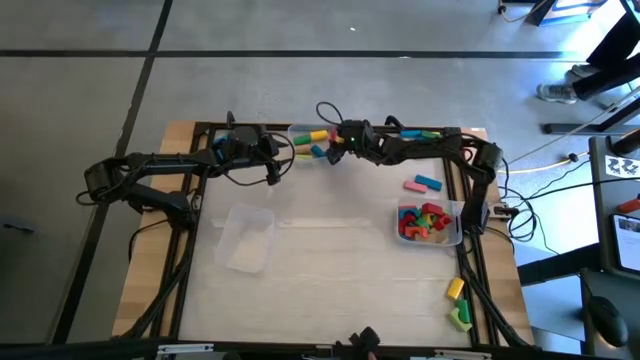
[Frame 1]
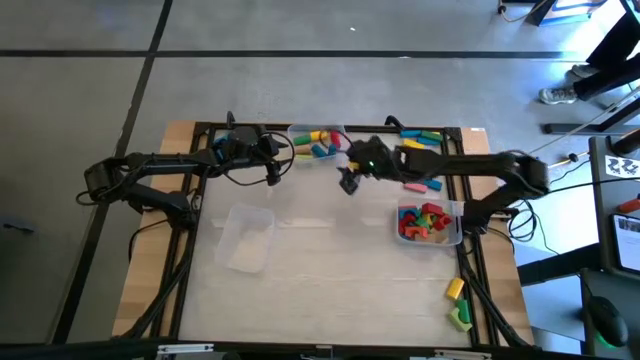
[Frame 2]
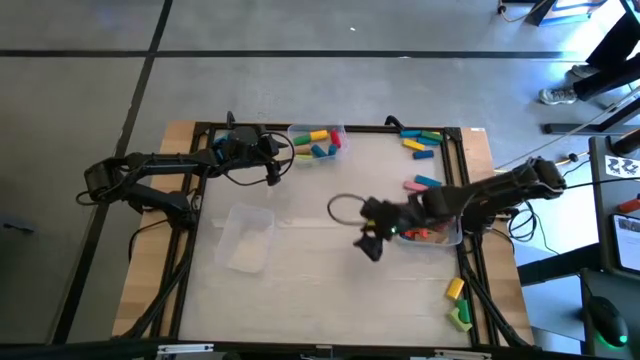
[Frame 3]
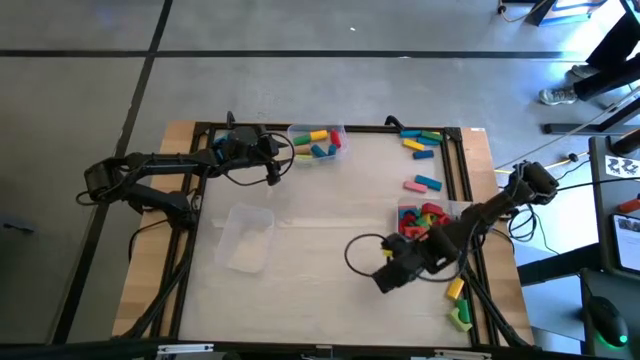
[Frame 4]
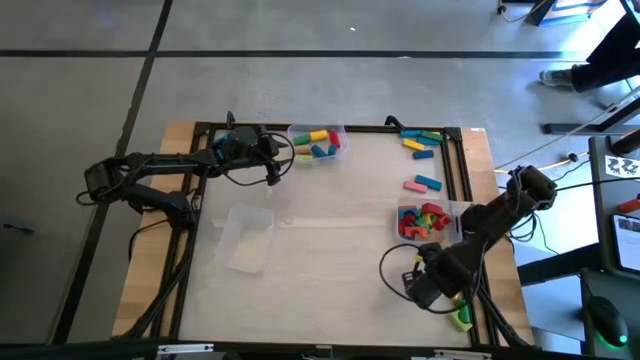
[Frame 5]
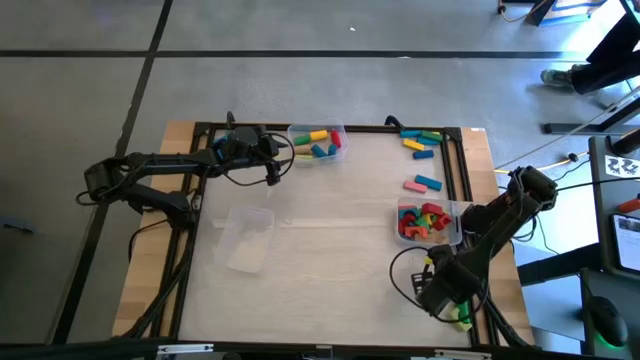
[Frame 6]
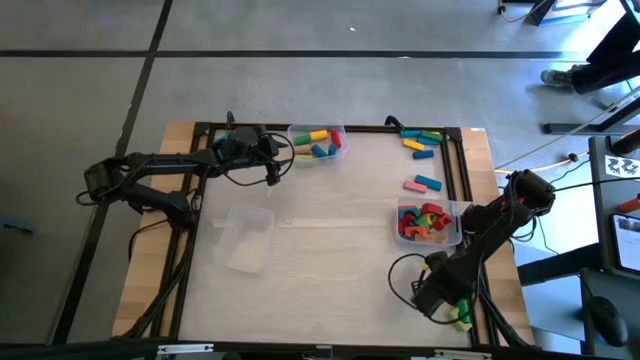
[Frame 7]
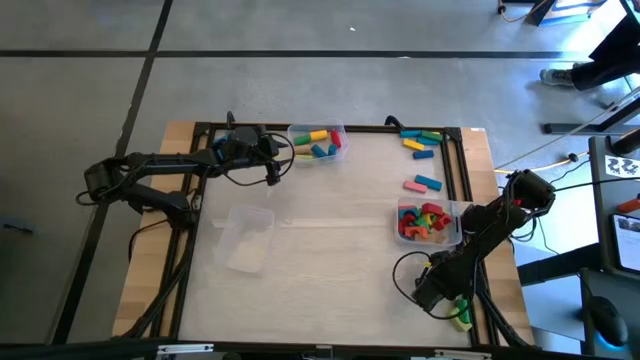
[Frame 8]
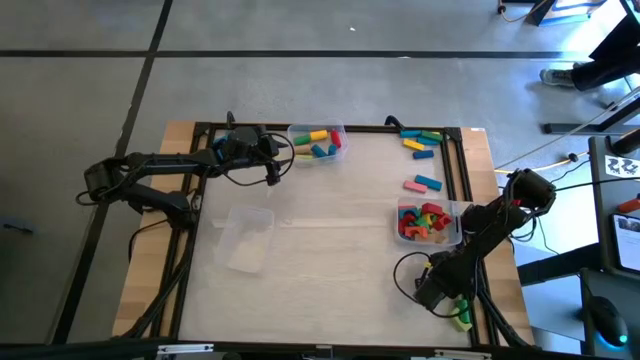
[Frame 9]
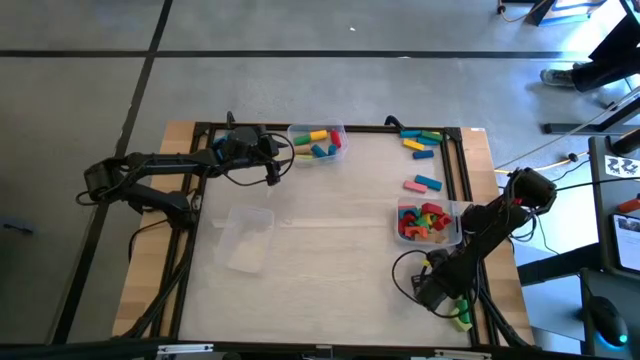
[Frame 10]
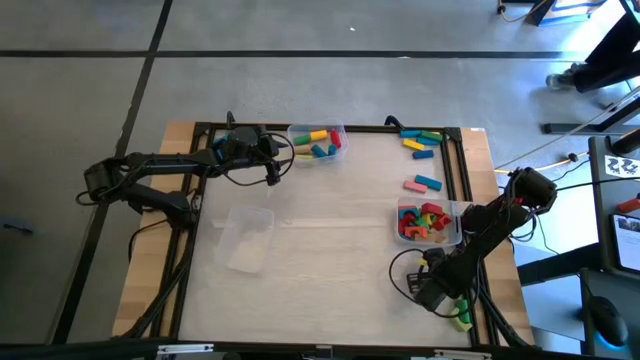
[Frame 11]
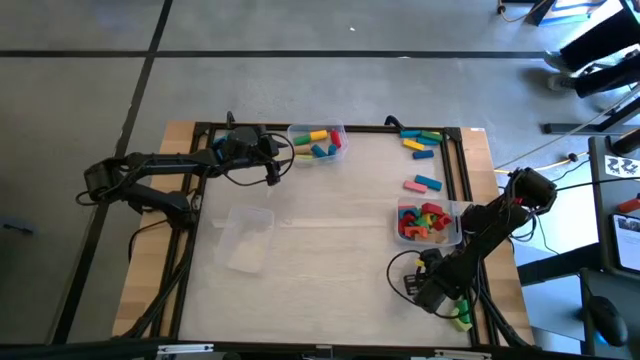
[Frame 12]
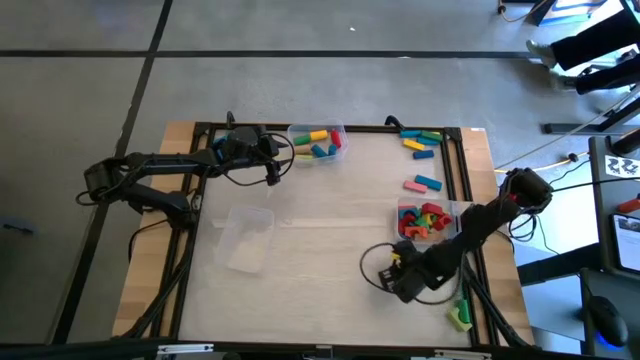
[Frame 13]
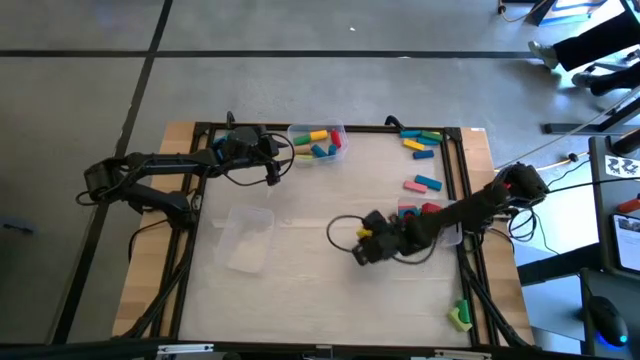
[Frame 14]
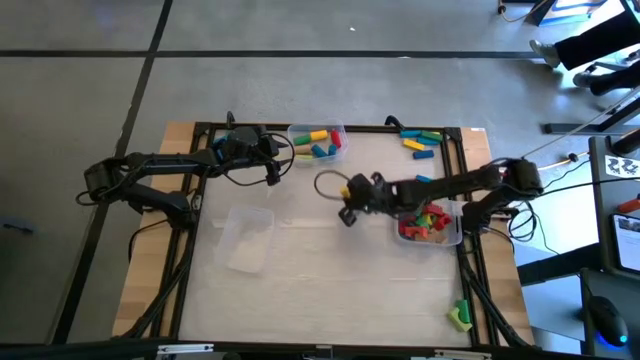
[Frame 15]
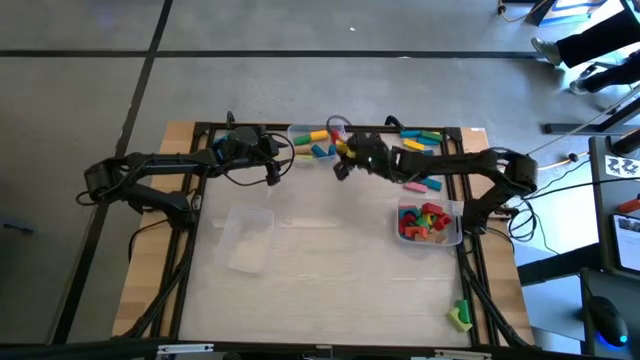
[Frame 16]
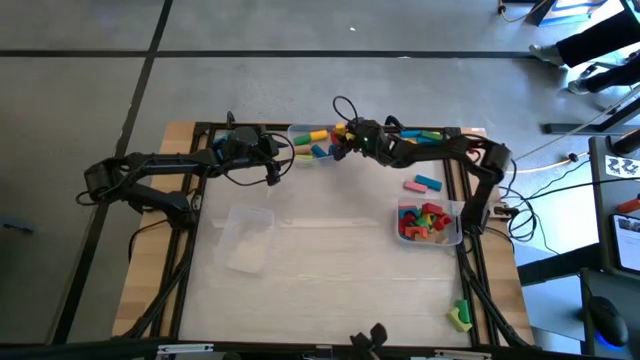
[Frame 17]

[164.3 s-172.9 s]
Task: Sort blocks by size
Put the yellow cylindrical block into the top transparent bin

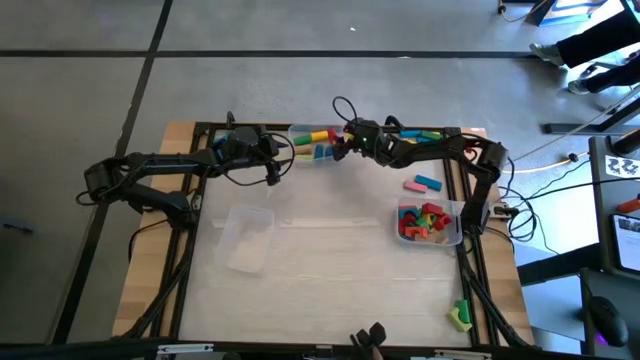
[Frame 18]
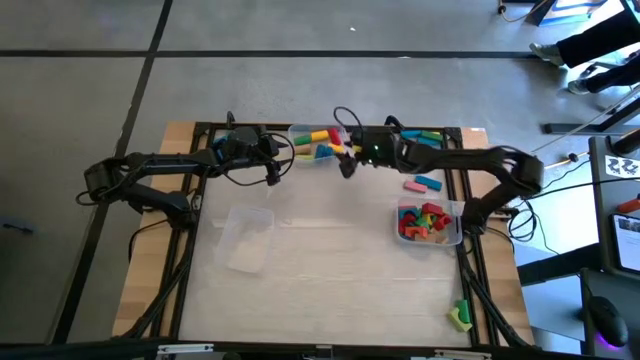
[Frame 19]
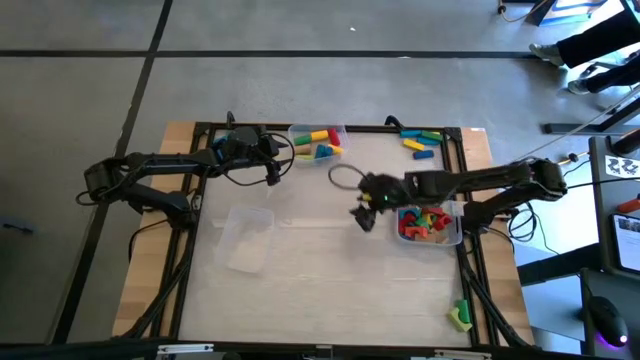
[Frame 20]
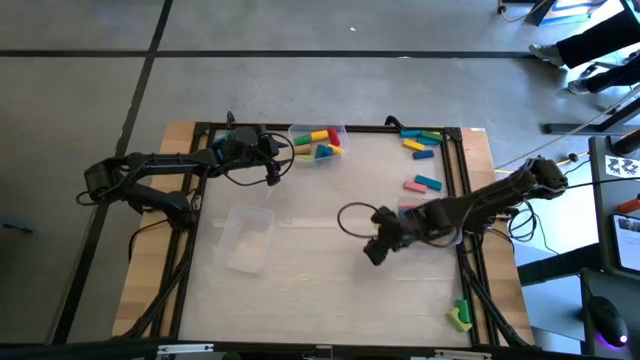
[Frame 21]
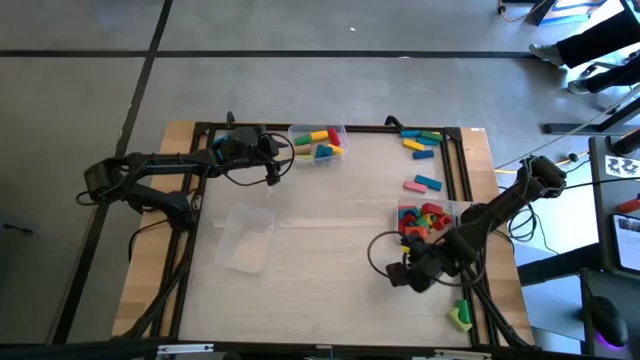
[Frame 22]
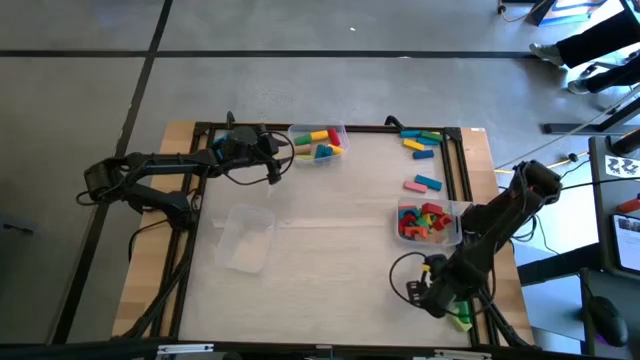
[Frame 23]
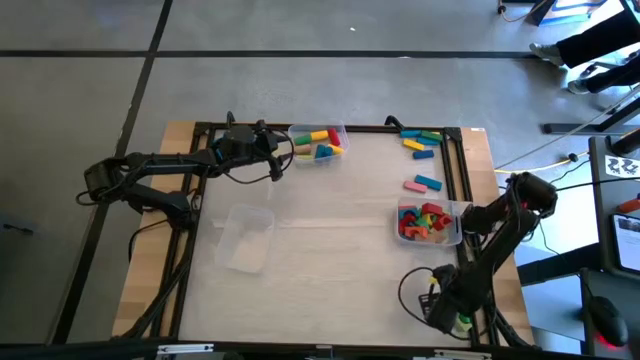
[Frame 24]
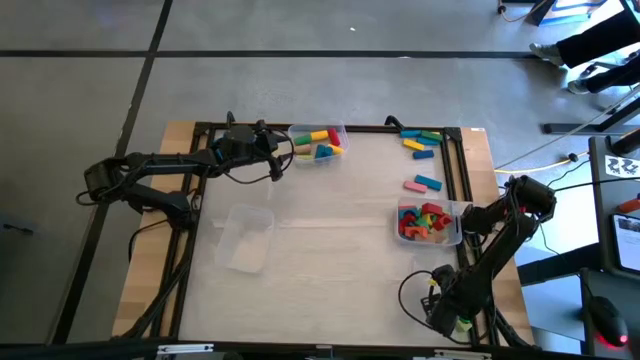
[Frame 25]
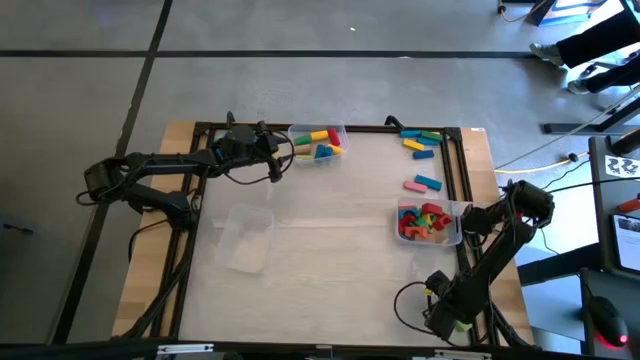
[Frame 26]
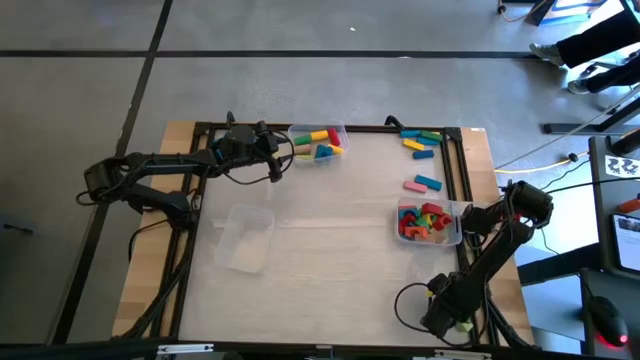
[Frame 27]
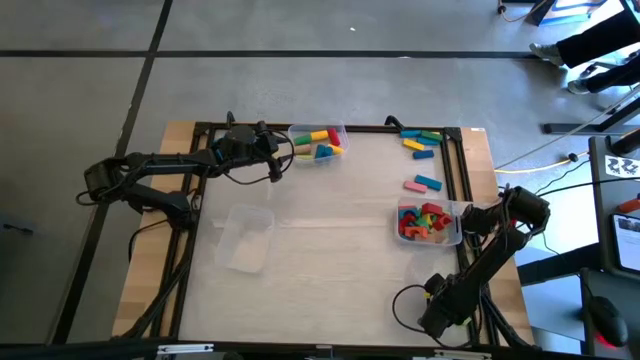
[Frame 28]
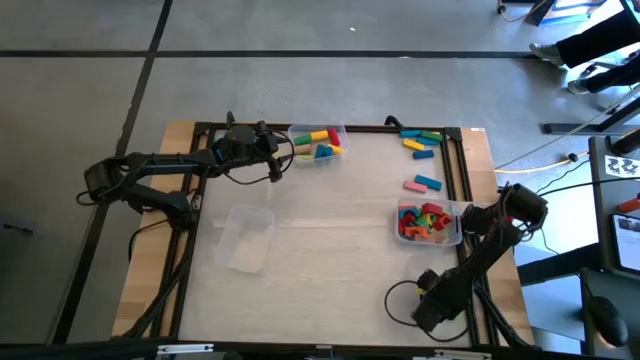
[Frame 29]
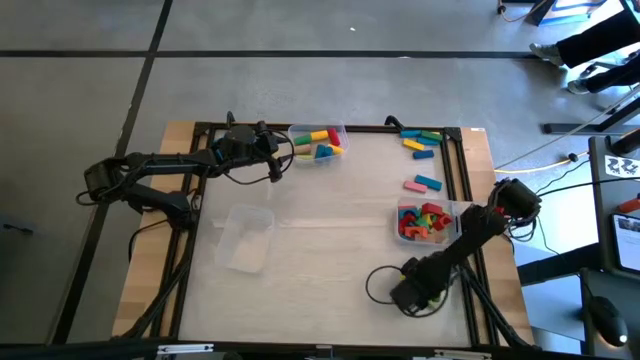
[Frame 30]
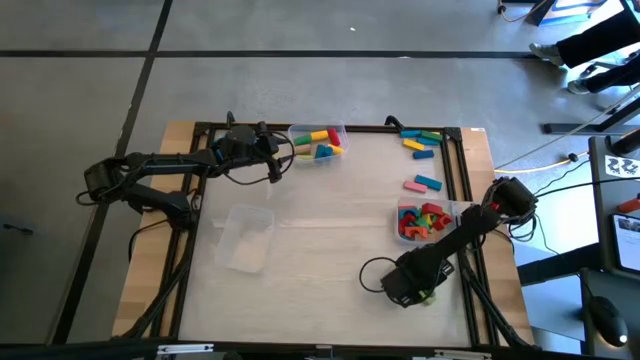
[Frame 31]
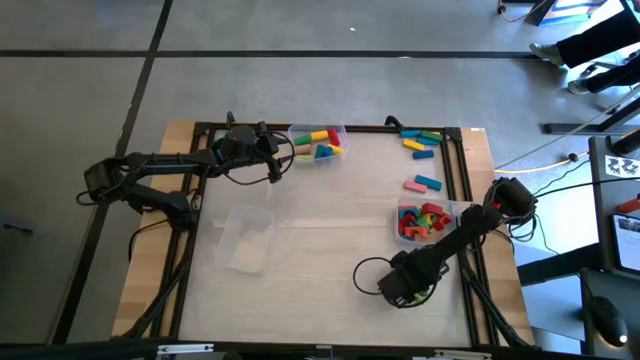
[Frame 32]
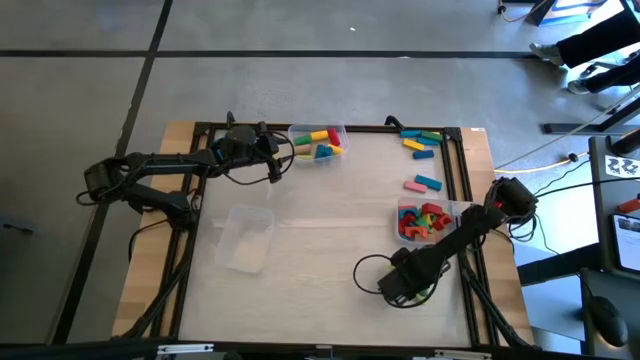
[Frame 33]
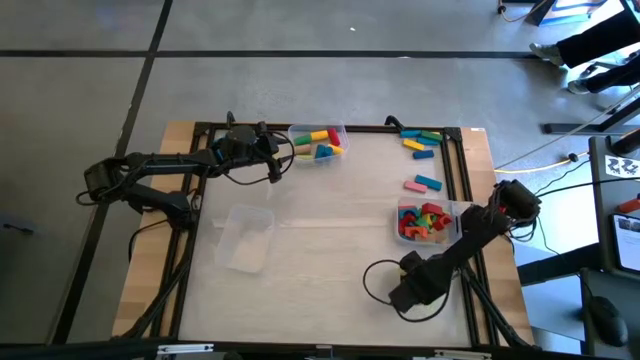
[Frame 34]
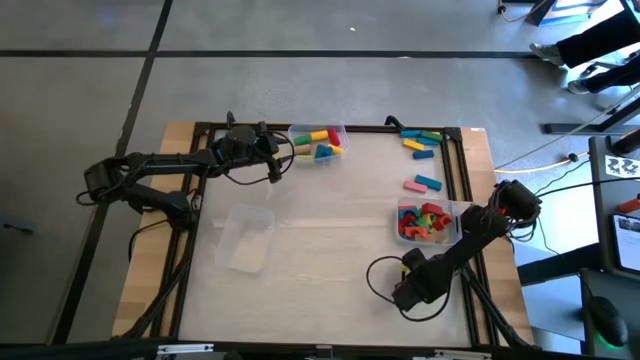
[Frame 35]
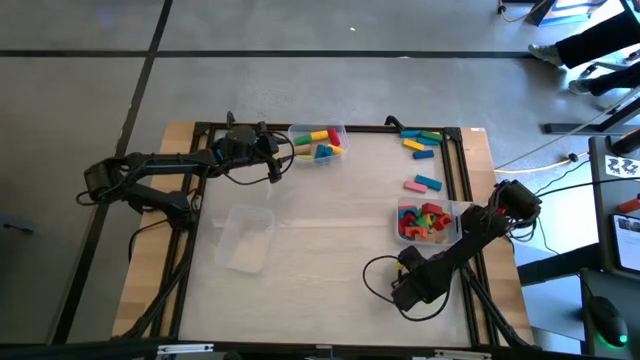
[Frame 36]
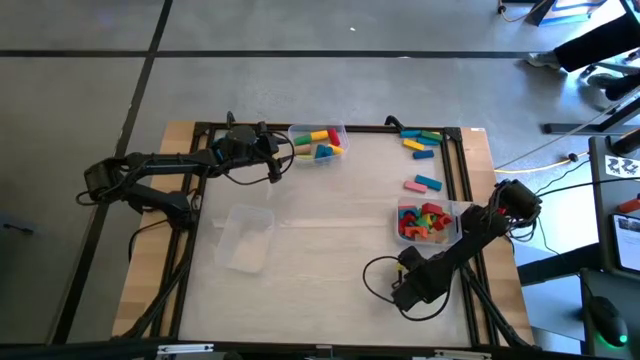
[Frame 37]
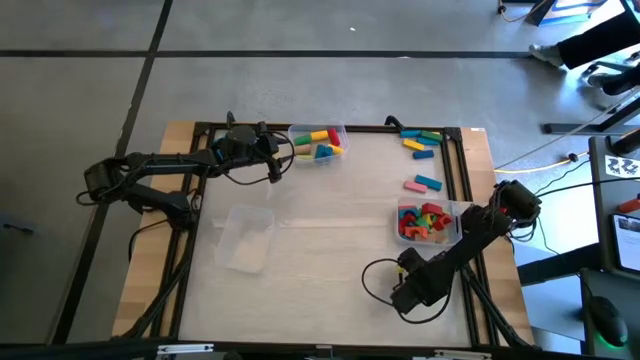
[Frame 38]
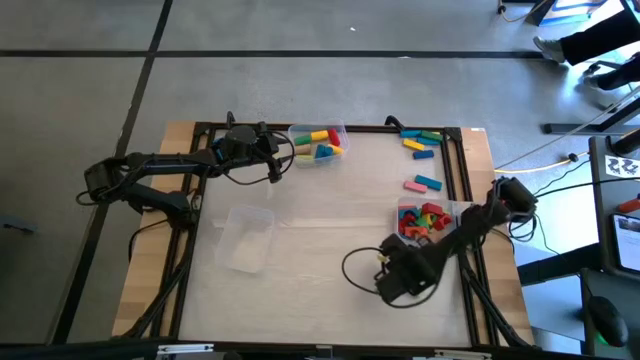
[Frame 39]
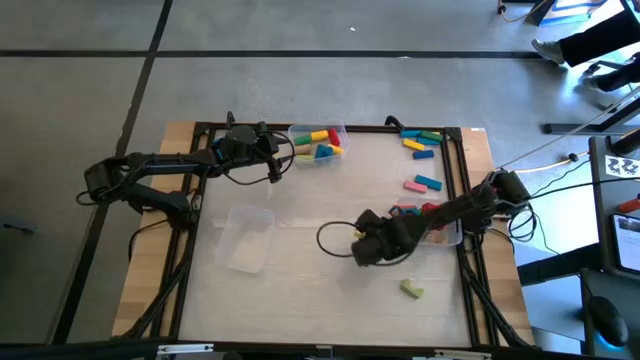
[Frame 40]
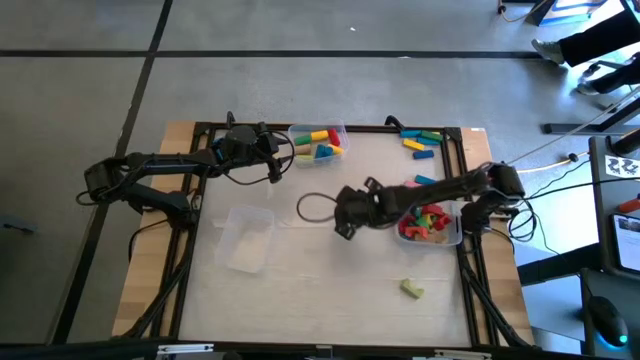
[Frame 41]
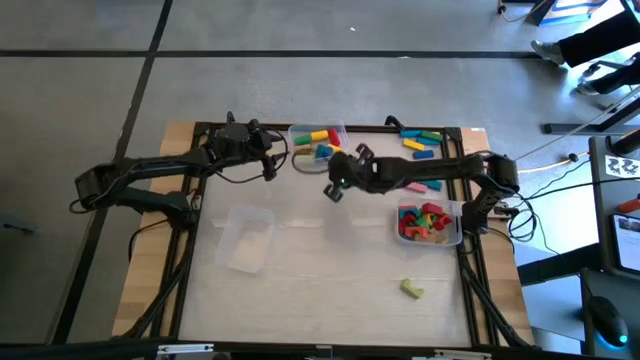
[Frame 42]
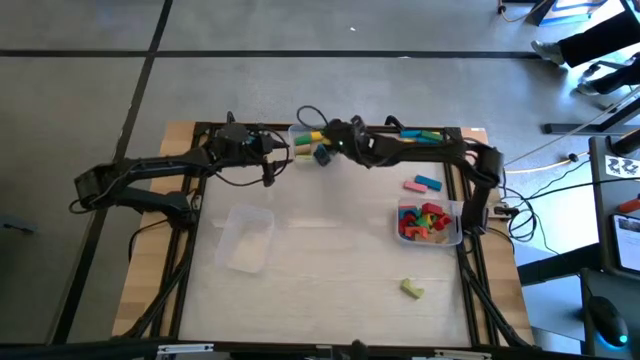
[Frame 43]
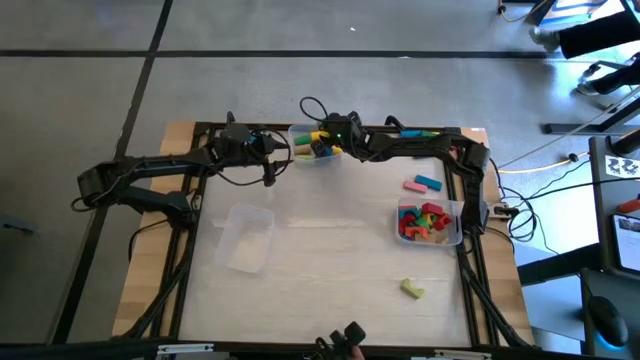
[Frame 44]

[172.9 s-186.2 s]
Put the green cylindrical block into the top transparent bin
